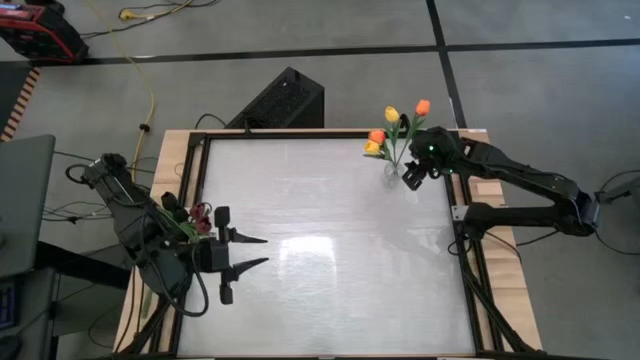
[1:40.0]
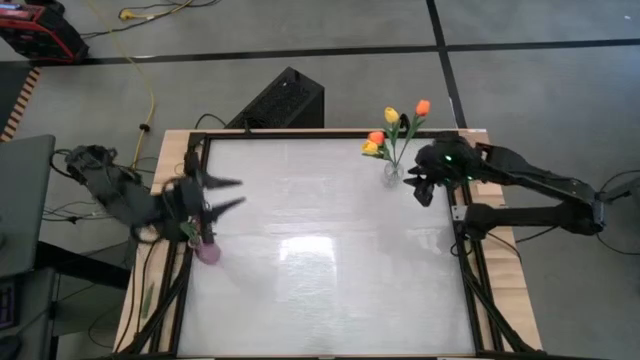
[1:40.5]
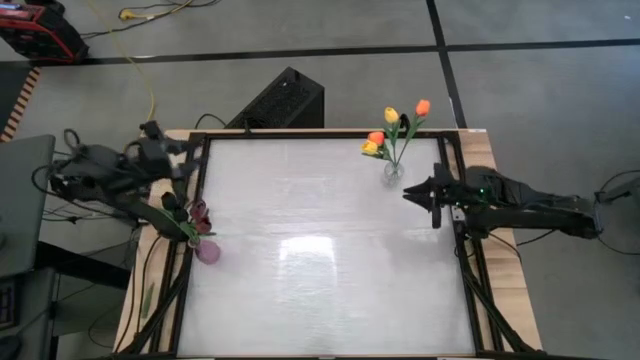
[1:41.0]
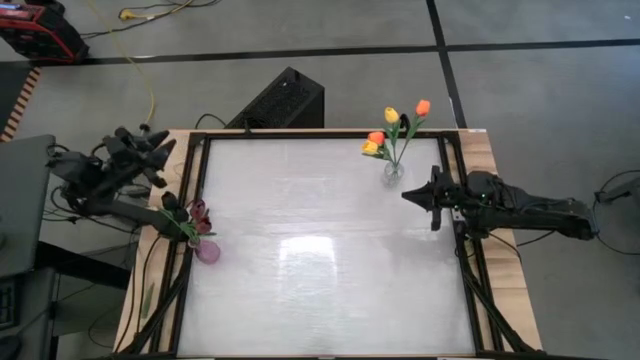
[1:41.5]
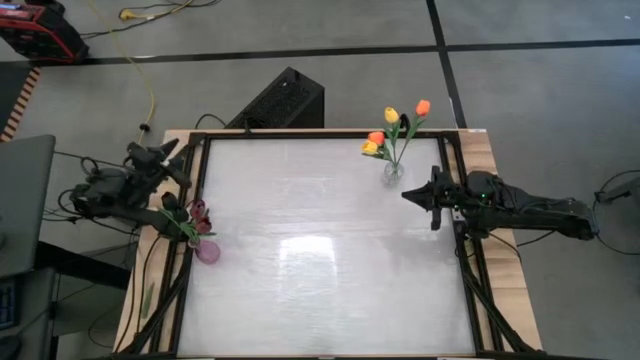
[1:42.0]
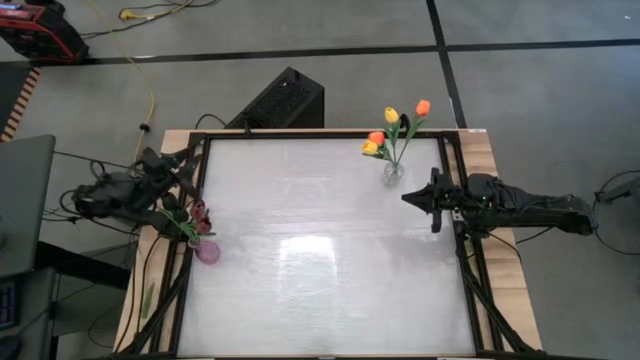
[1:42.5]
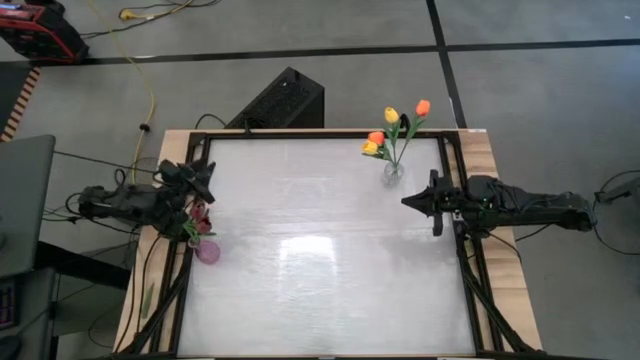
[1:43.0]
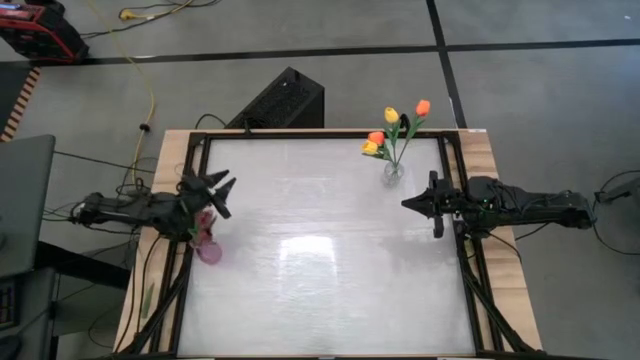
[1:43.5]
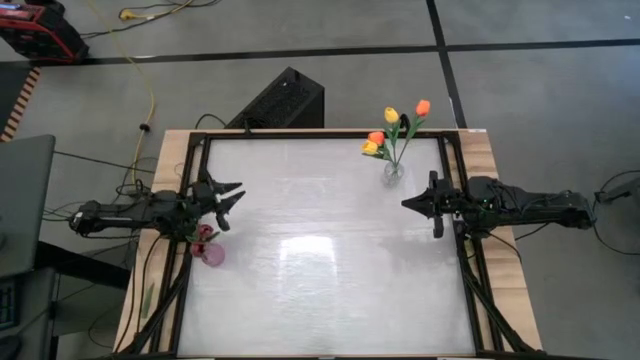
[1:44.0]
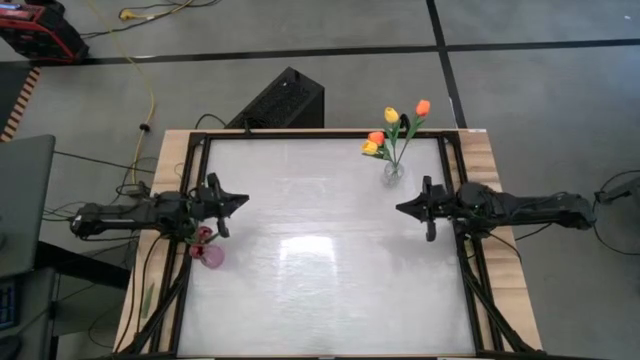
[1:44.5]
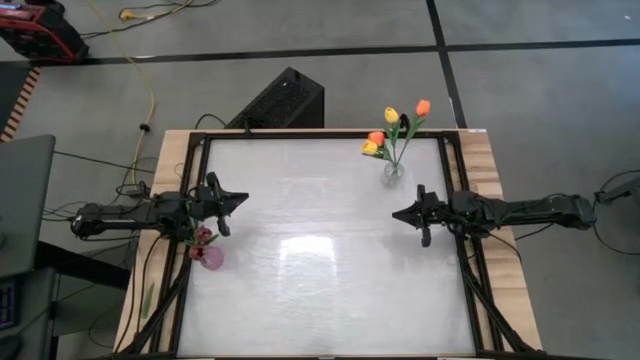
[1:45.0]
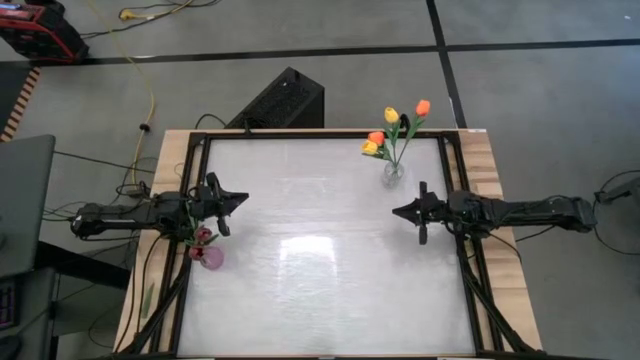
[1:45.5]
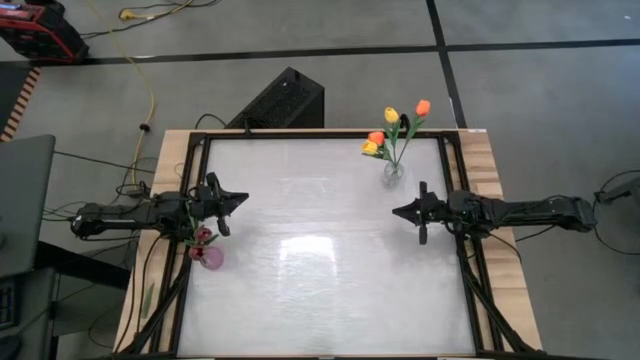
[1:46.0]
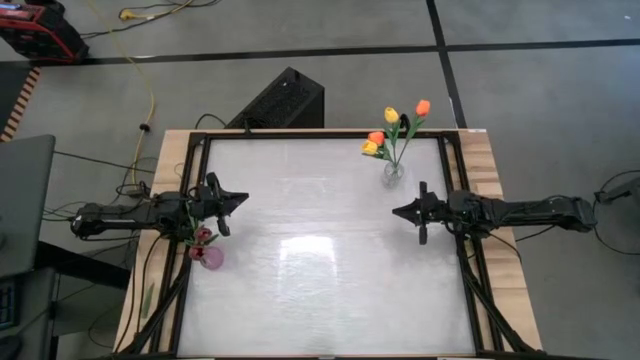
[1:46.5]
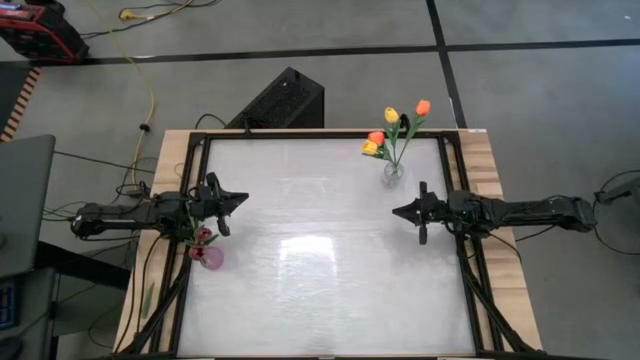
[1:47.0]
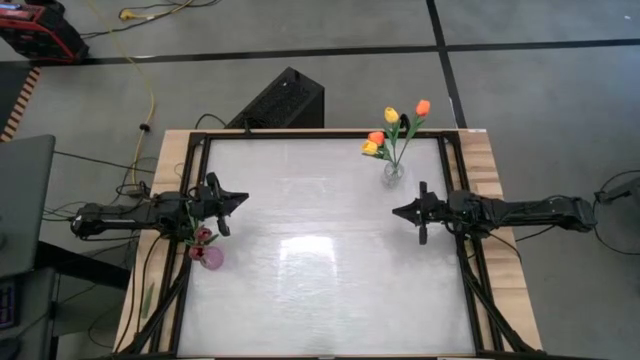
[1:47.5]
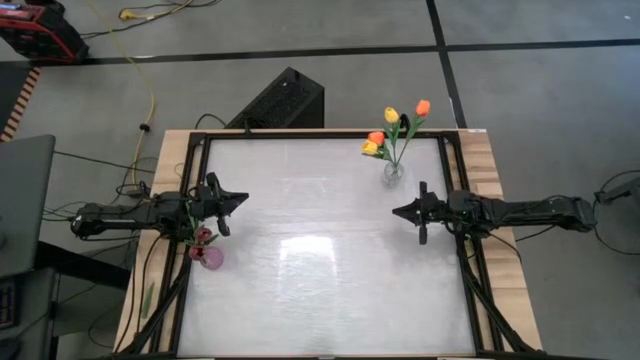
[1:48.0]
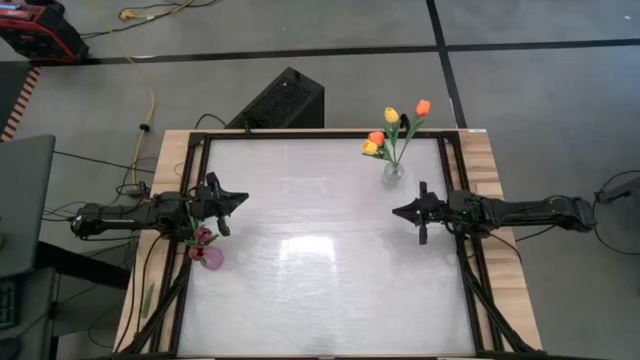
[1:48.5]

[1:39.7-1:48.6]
Task: Sort flowers into vase by color
Return to Home Position

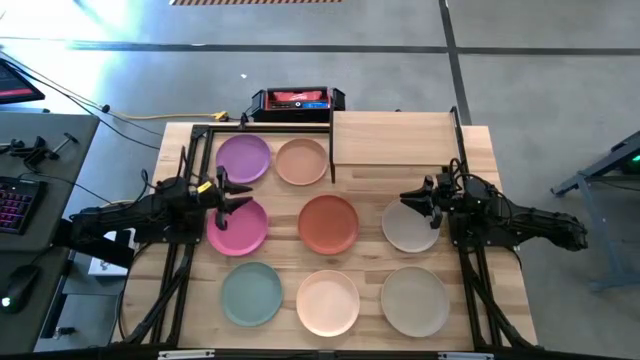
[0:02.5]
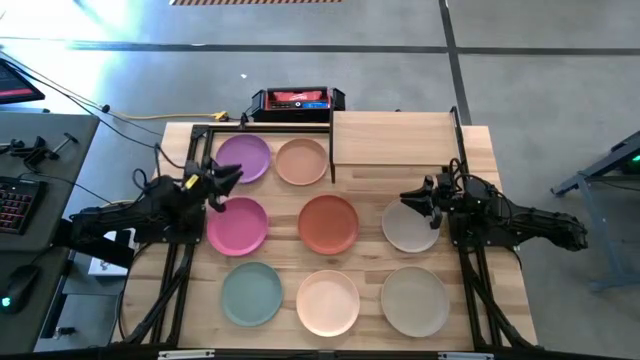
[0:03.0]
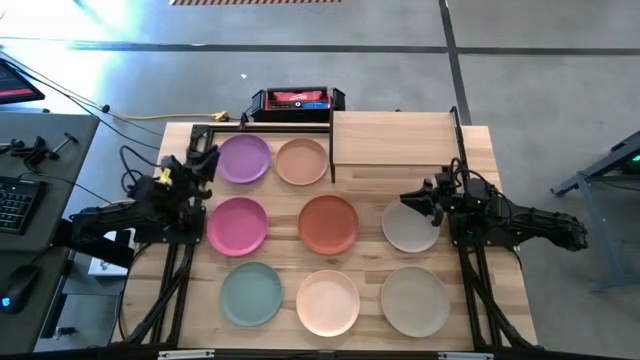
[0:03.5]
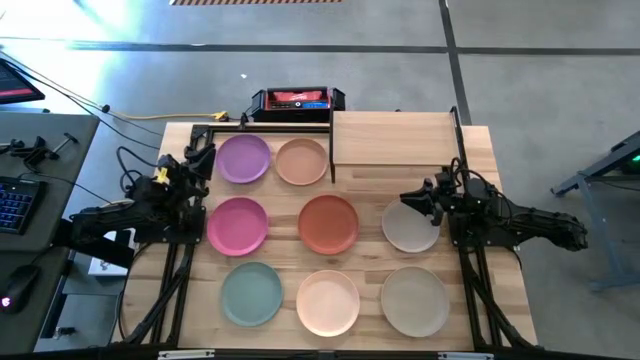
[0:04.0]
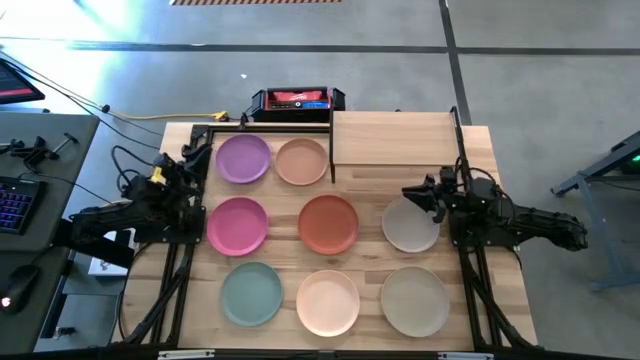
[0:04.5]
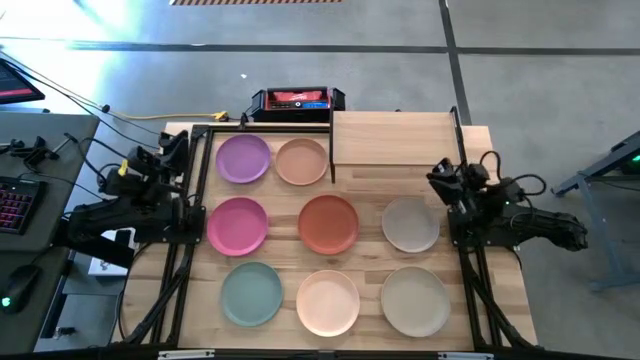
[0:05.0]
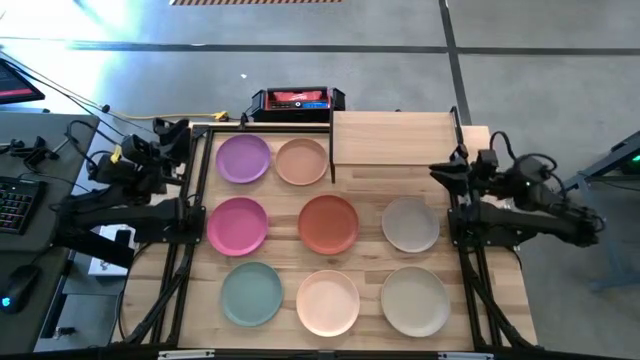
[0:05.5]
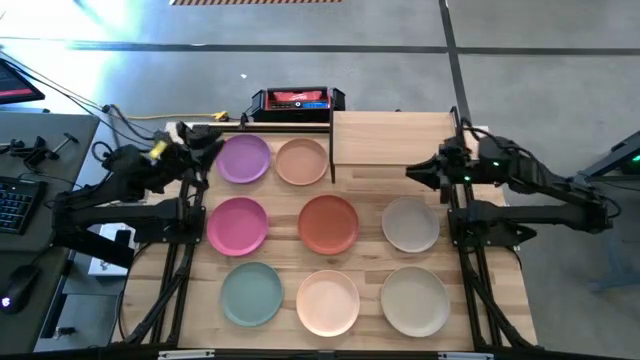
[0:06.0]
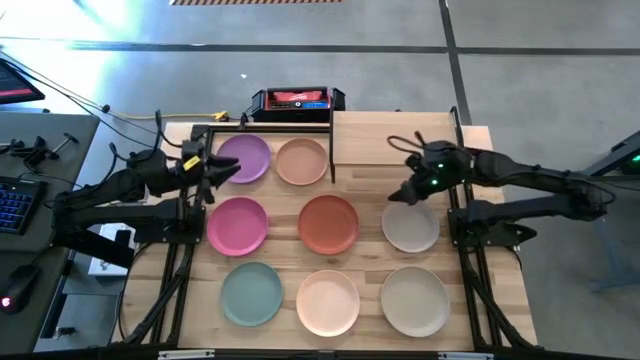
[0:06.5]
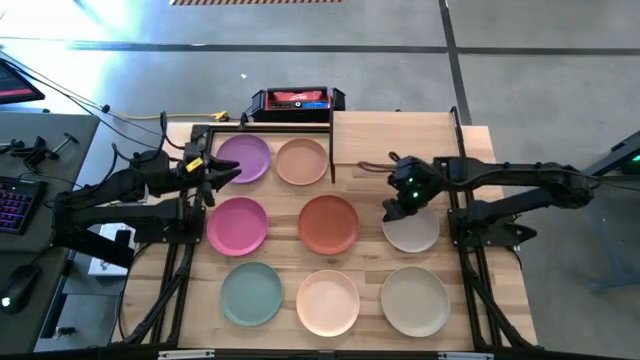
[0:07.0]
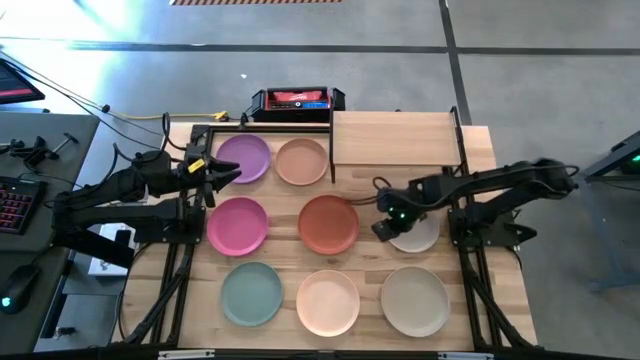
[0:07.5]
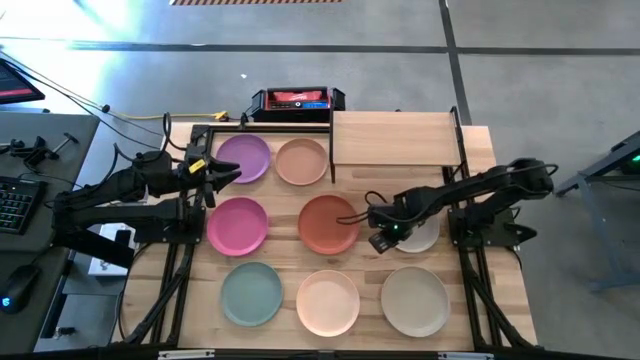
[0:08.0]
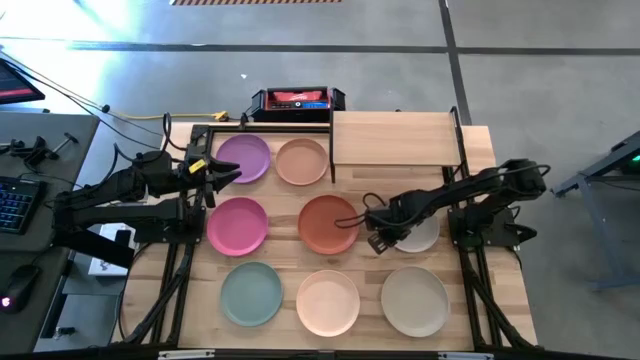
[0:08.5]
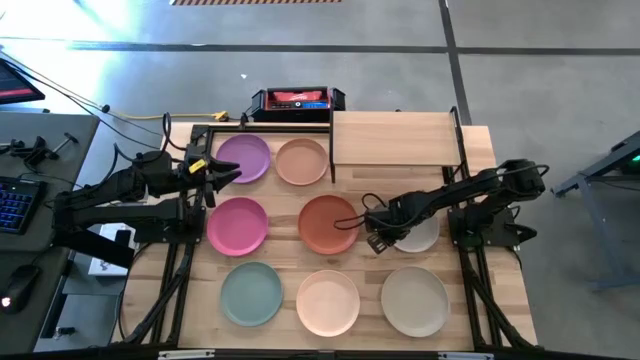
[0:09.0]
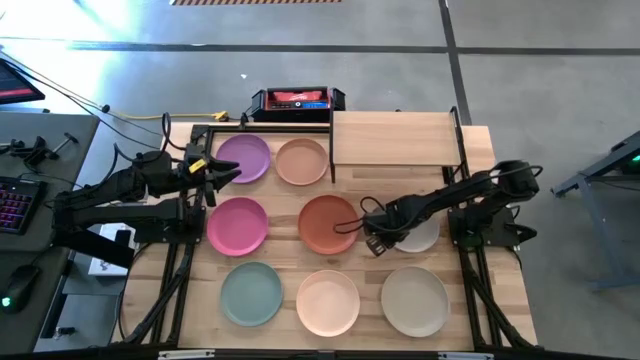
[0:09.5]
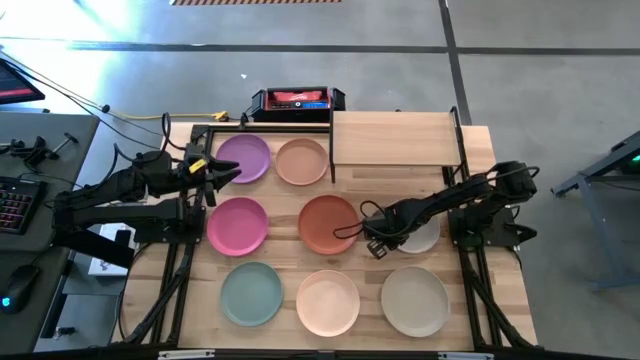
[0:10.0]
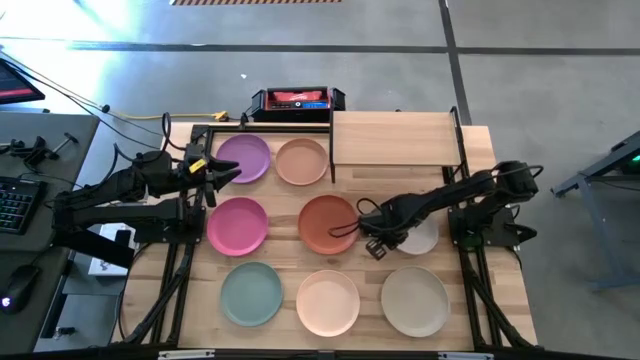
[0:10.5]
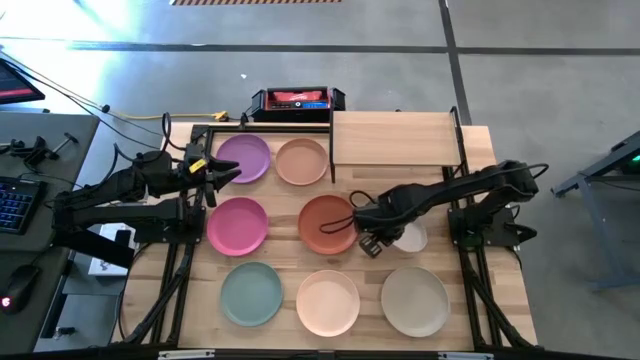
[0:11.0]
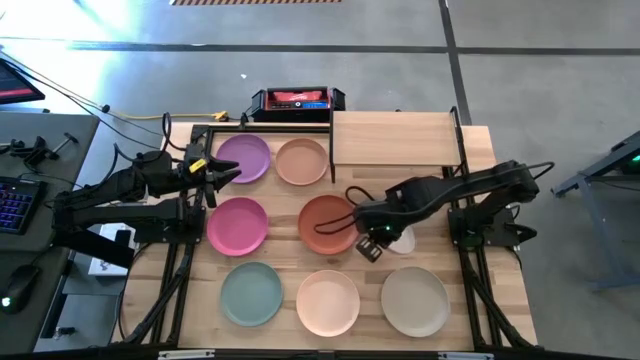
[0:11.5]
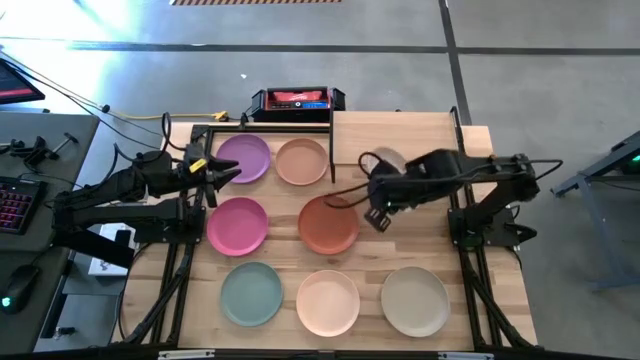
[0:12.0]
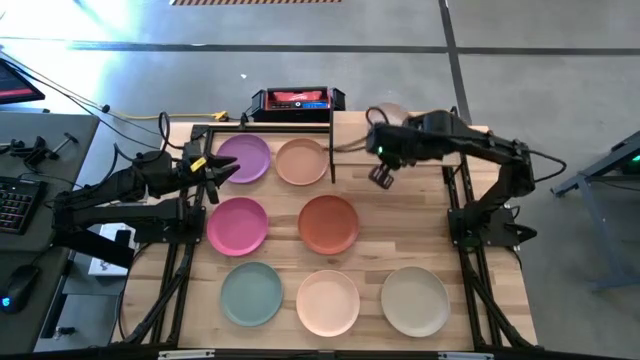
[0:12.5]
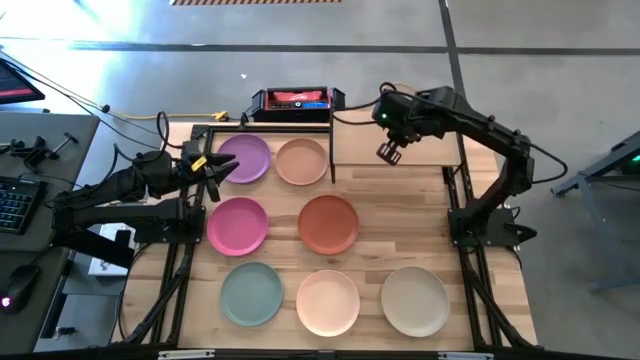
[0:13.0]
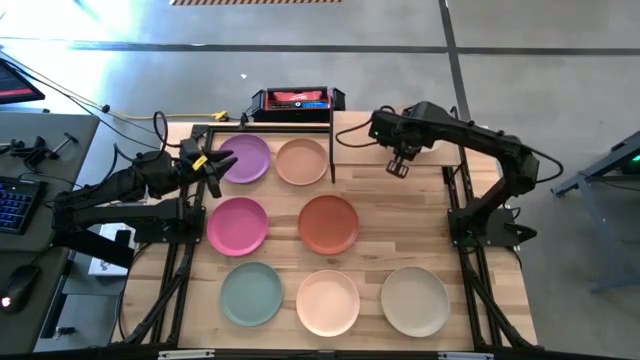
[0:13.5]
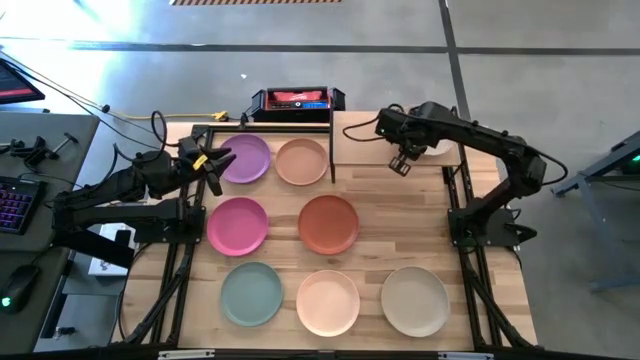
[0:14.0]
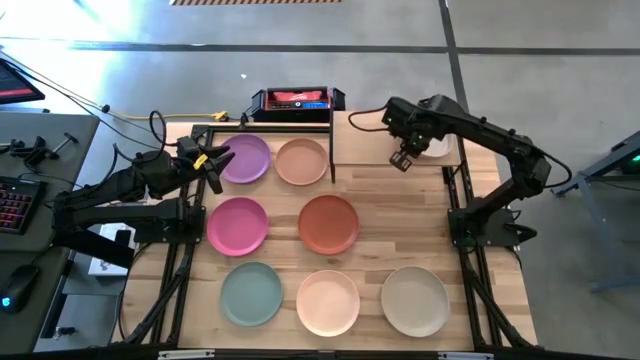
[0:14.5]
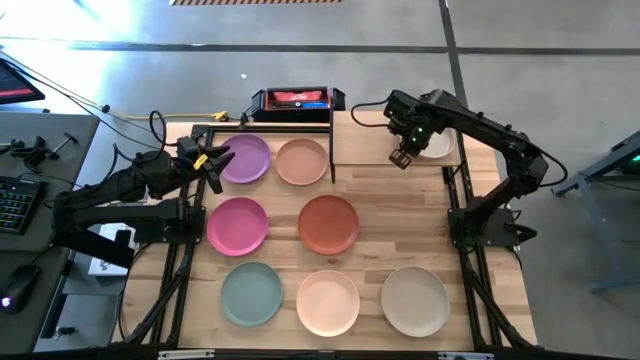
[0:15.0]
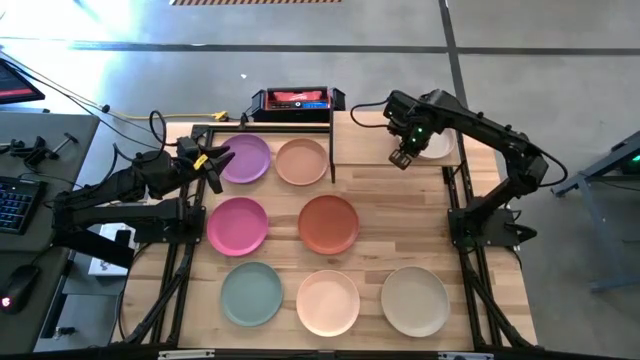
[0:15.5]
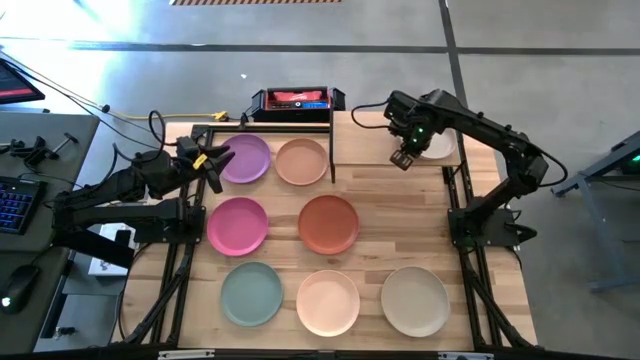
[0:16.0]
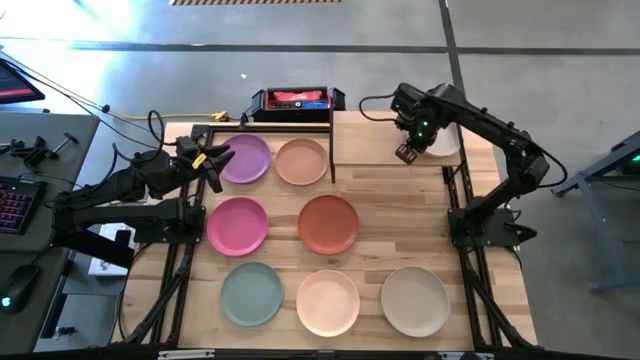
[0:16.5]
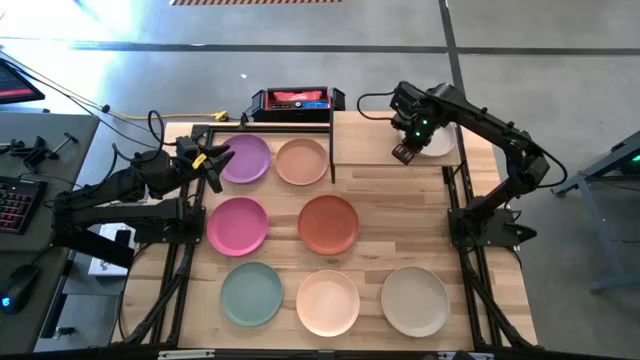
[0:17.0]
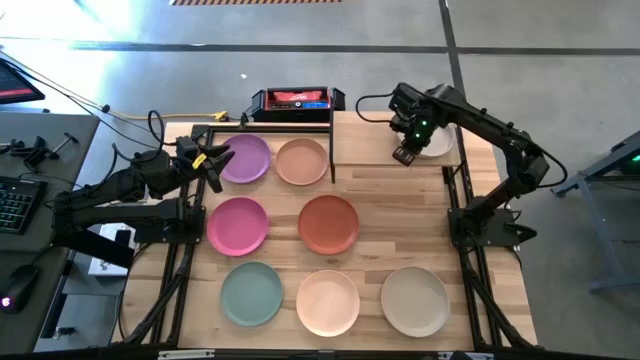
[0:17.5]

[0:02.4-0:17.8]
Task: Place and stack plates onto a shelf
Put the top gray plate on the shelf
